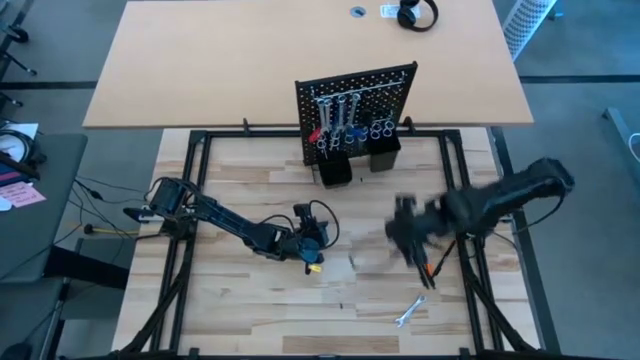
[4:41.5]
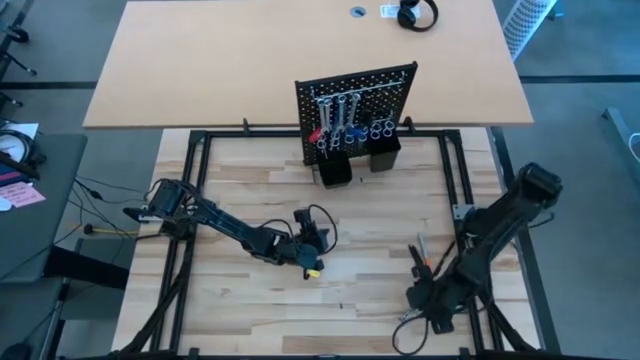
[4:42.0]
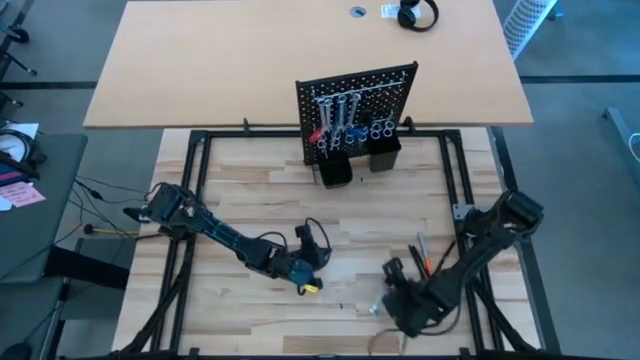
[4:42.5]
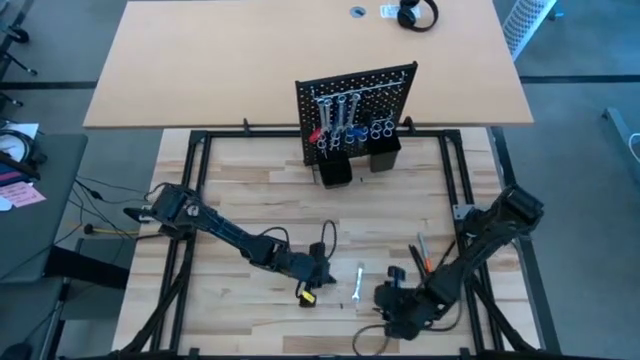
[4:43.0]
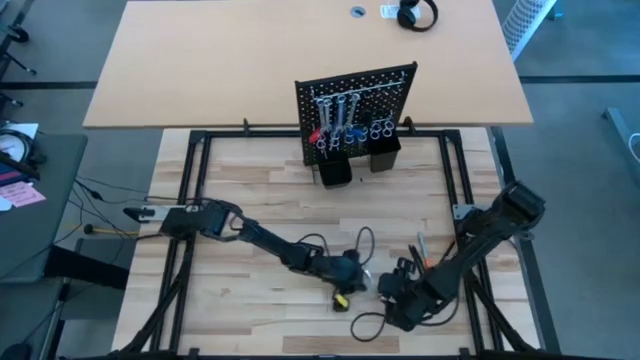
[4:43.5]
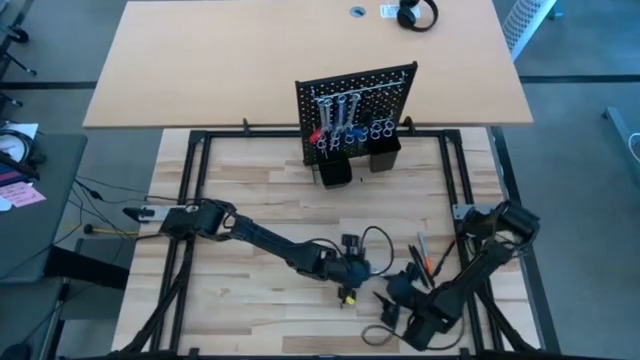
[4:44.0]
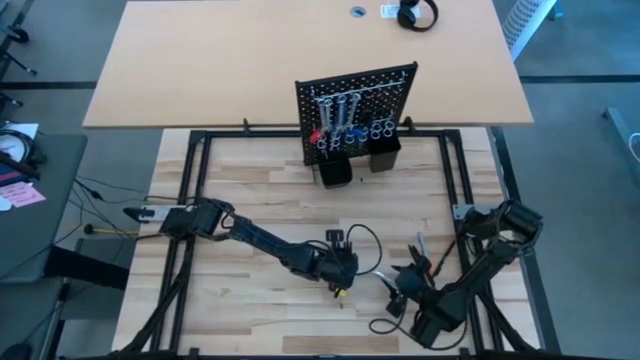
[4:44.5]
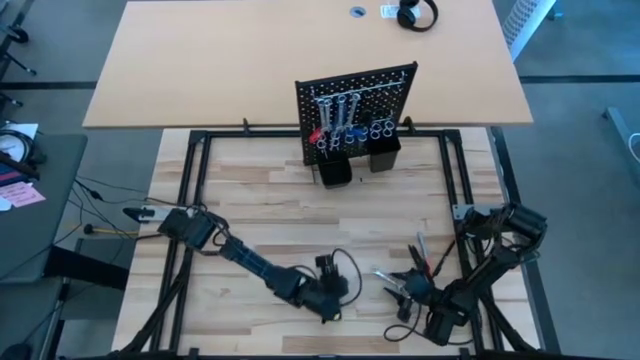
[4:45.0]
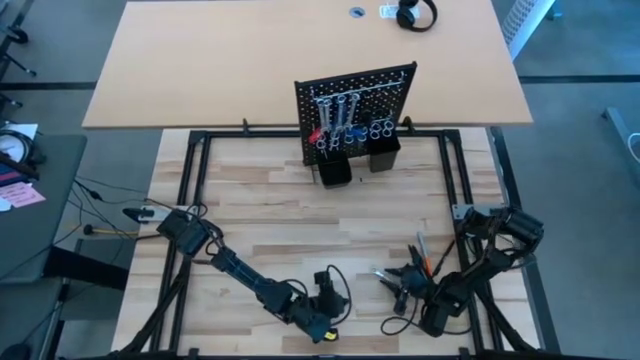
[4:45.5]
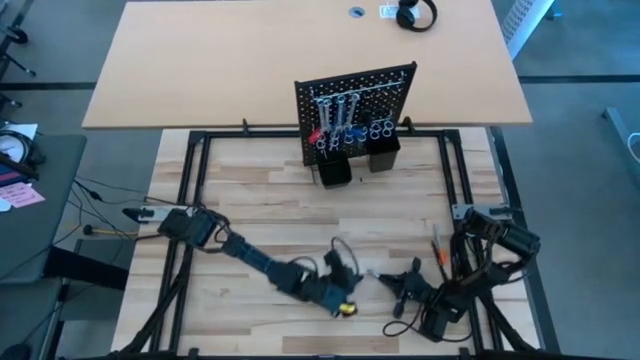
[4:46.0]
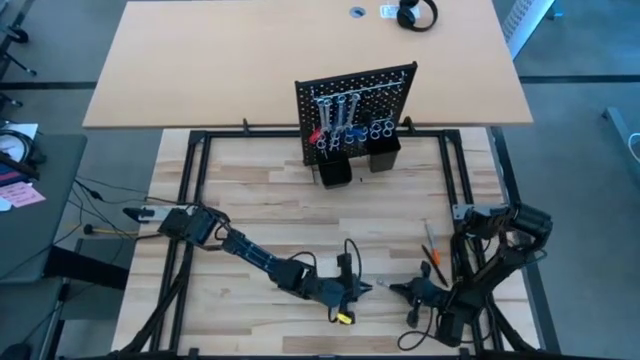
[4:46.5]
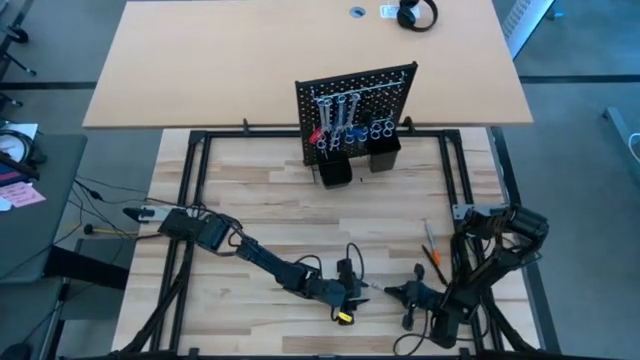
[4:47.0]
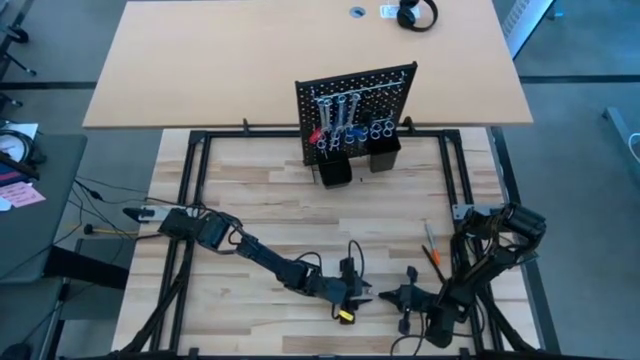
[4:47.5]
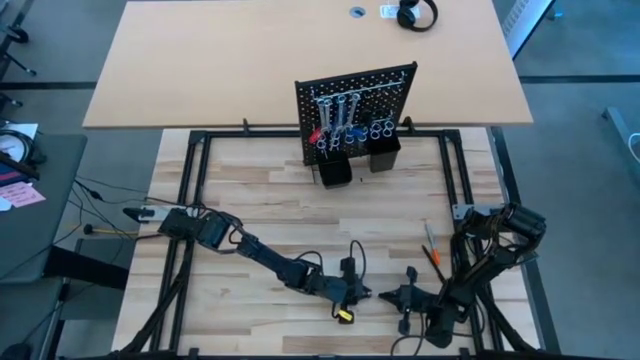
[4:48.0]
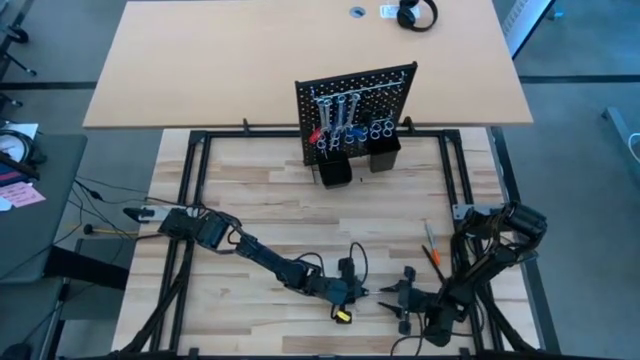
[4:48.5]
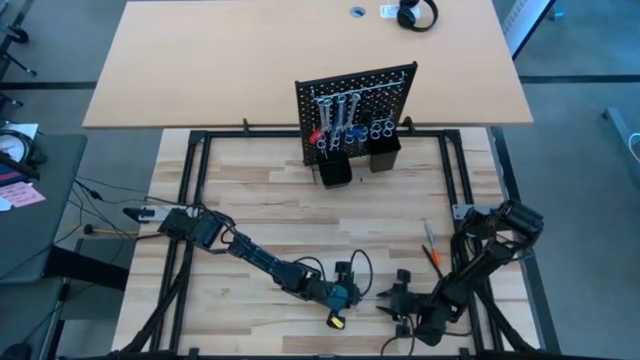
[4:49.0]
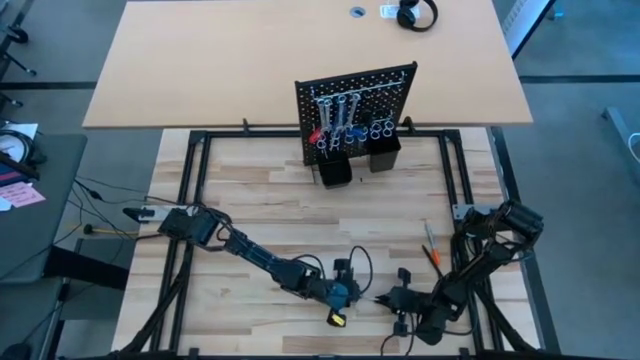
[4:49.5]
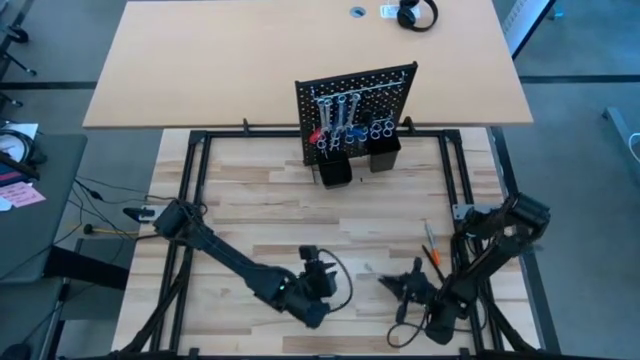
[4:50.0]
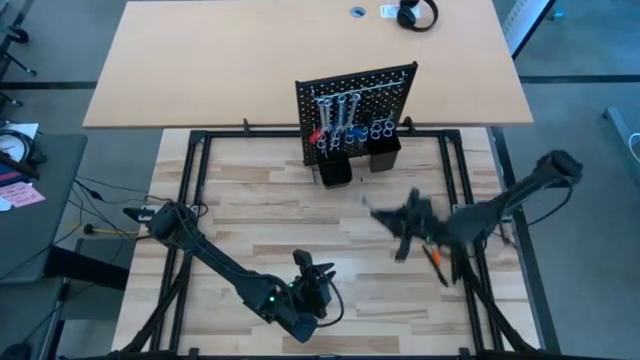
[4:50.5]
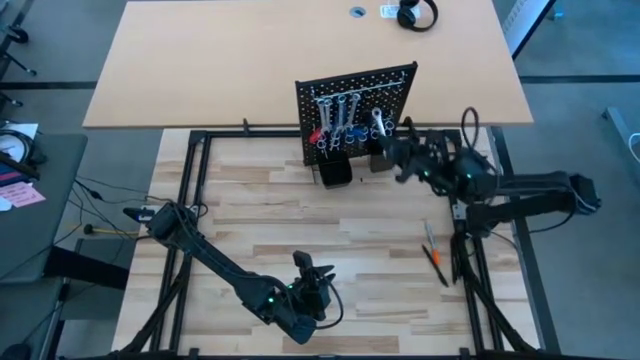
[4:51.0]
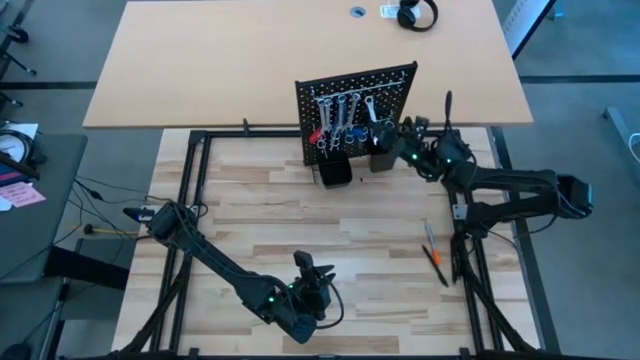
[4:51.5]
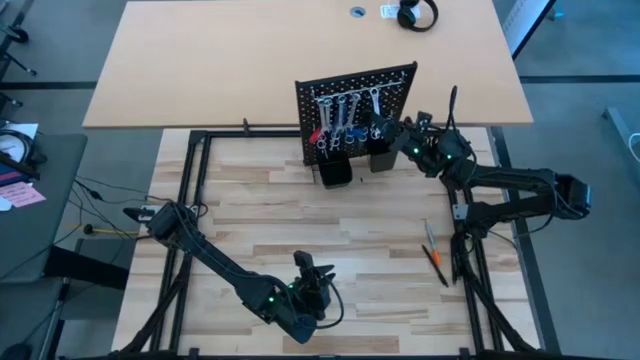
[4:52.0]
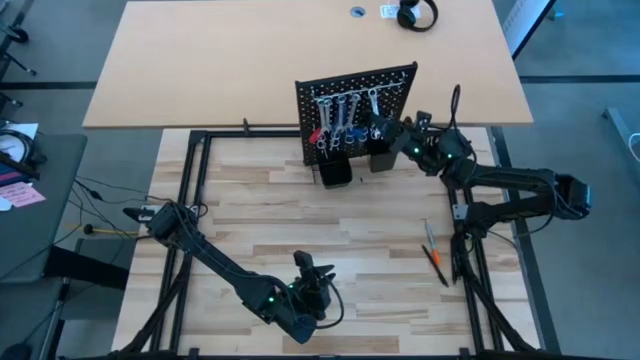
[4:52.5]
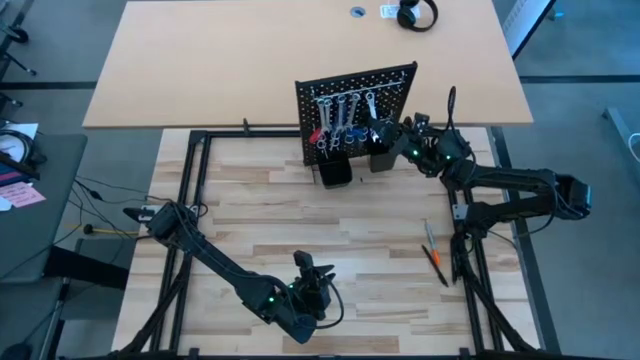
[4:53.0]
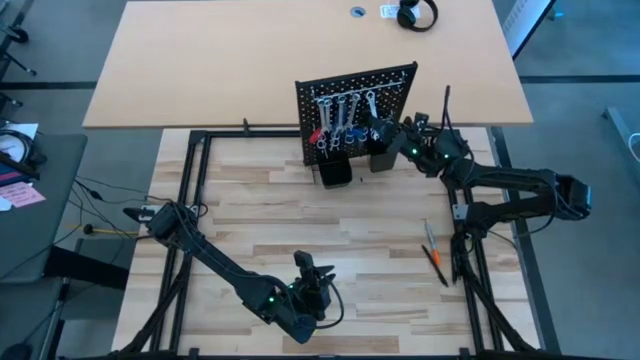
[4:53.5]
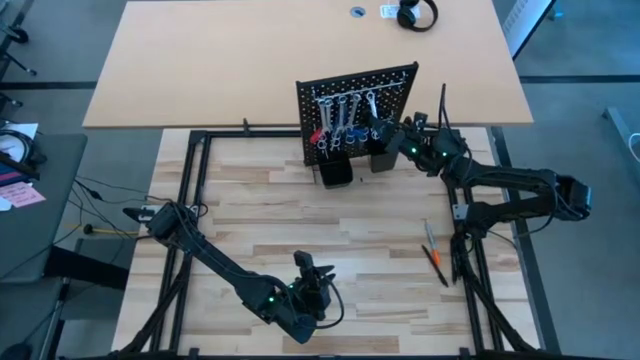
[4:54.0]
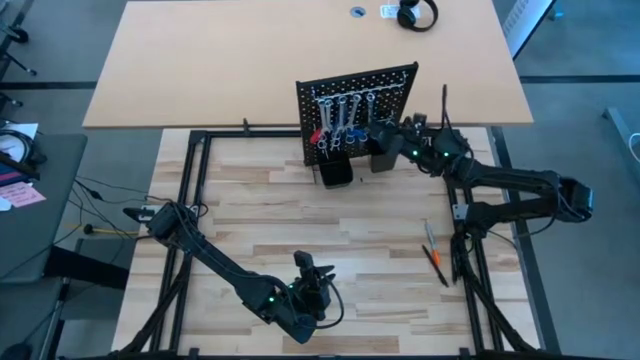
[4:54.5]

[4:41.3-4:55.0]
Task: Hang tools onto peg board
Hang the wrench on the pegboard

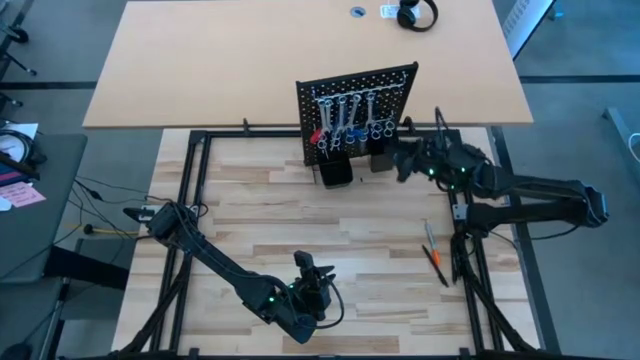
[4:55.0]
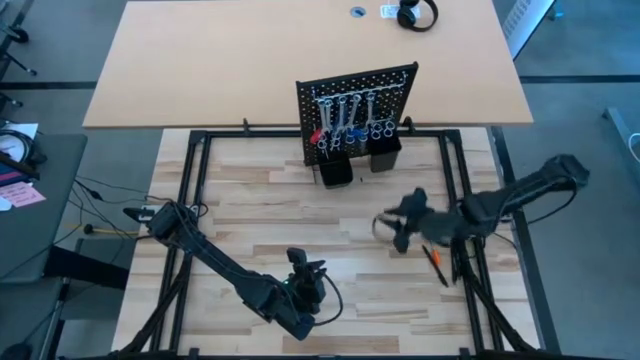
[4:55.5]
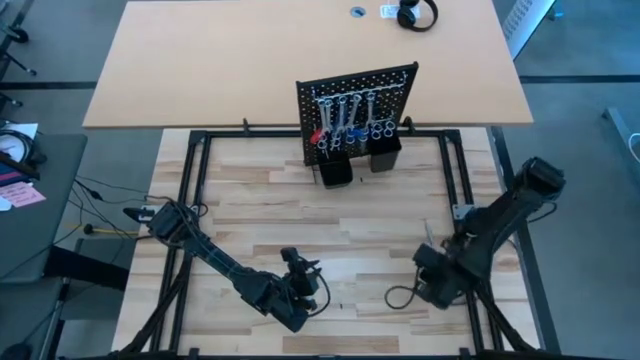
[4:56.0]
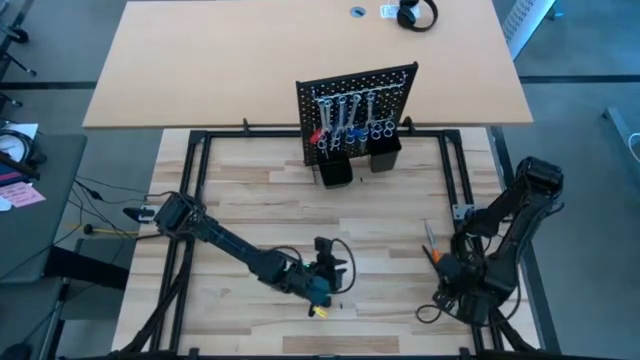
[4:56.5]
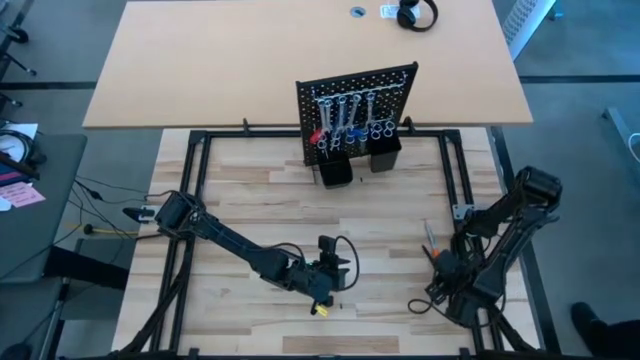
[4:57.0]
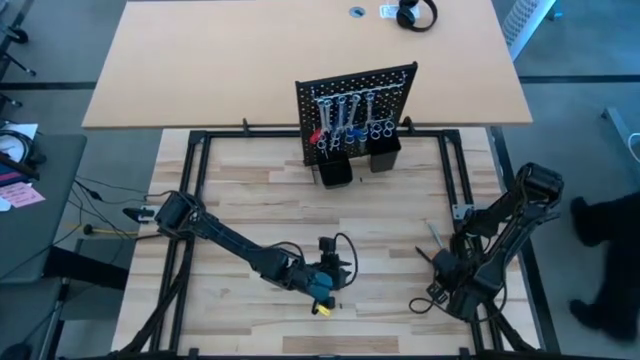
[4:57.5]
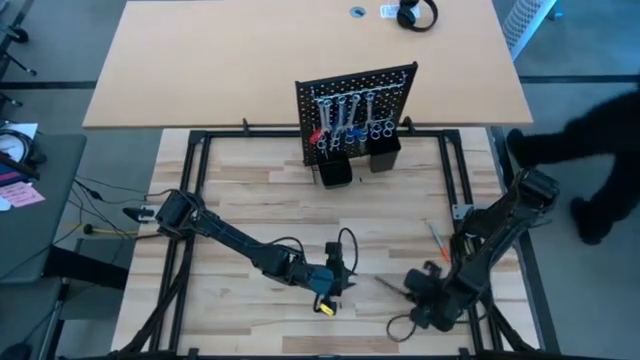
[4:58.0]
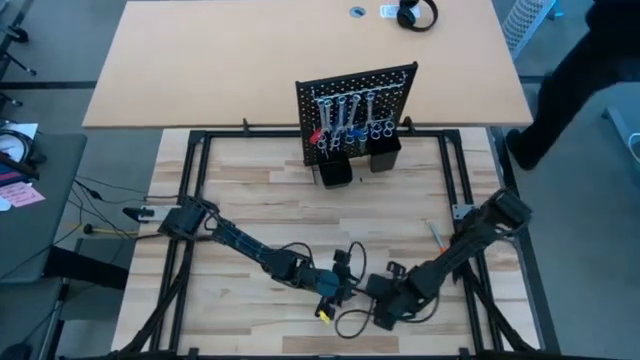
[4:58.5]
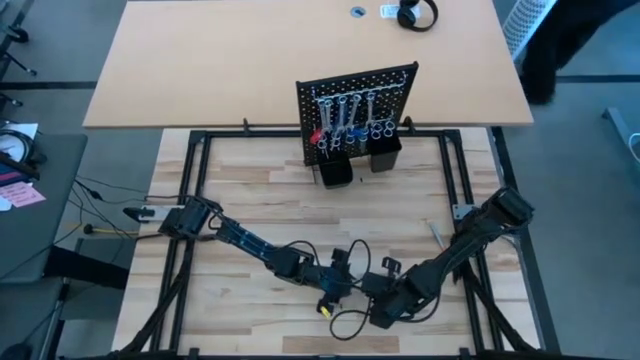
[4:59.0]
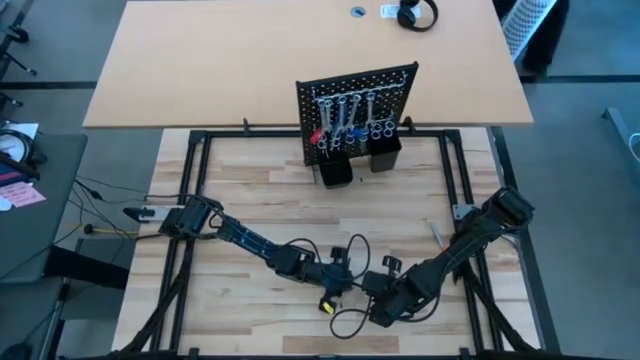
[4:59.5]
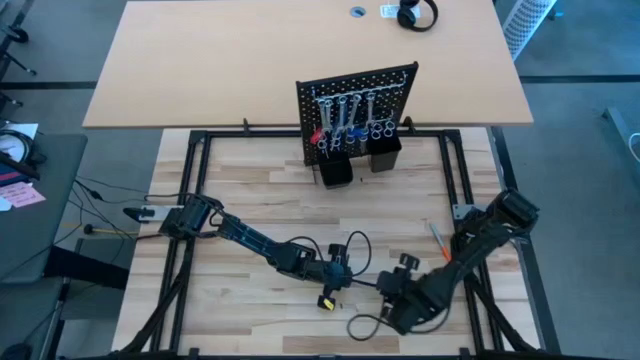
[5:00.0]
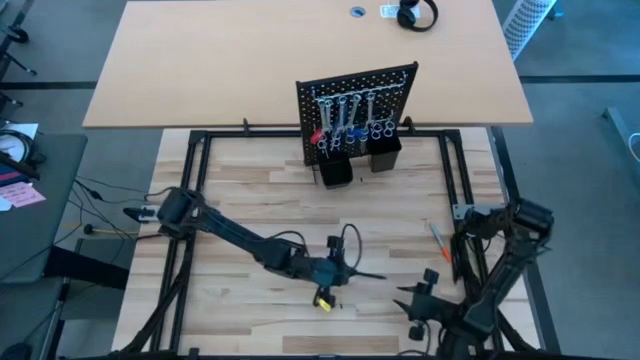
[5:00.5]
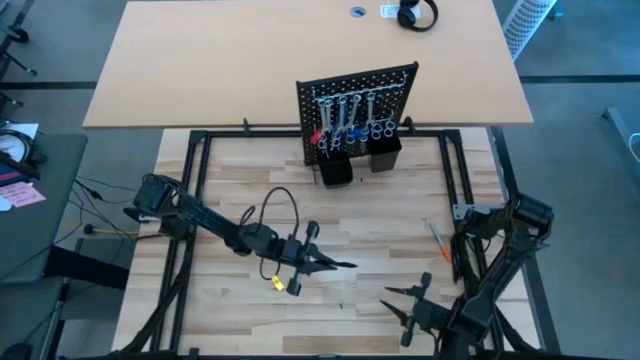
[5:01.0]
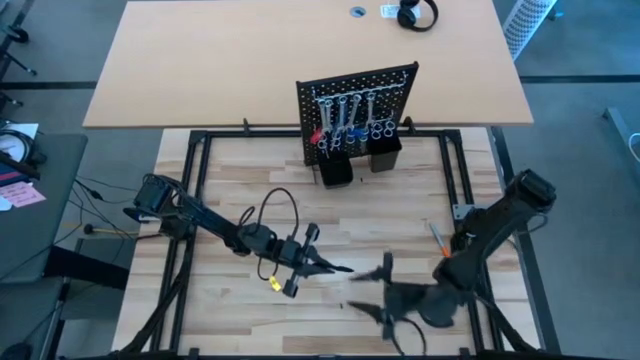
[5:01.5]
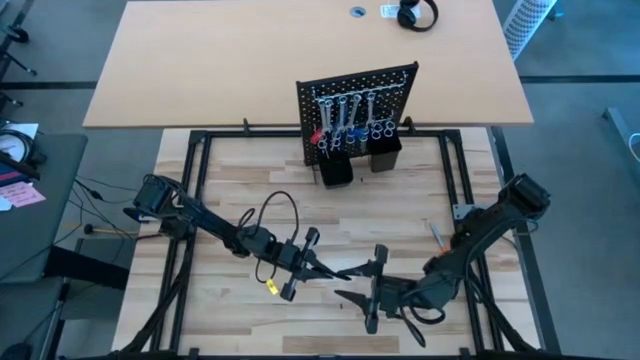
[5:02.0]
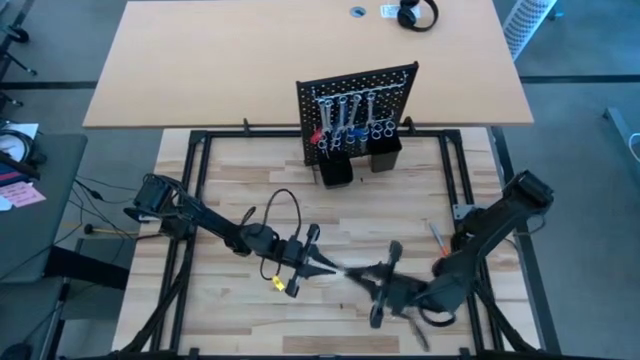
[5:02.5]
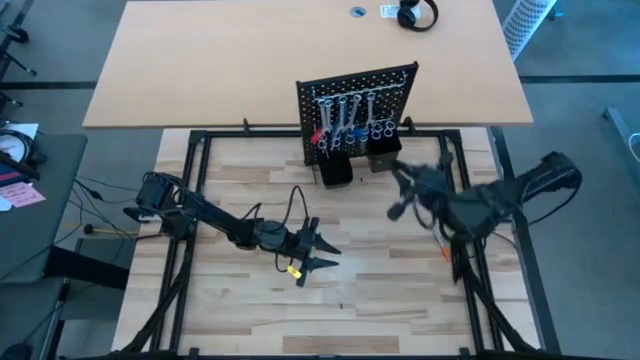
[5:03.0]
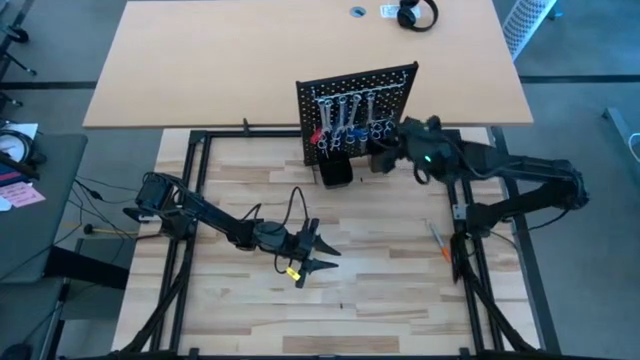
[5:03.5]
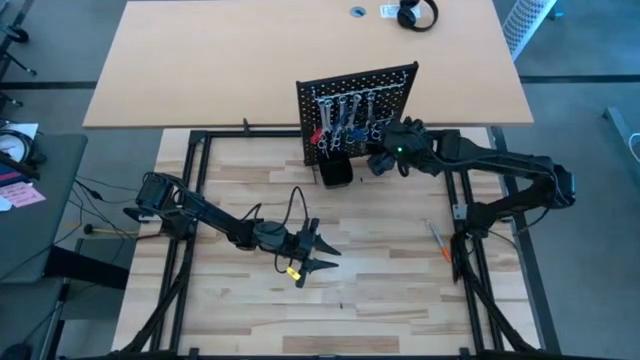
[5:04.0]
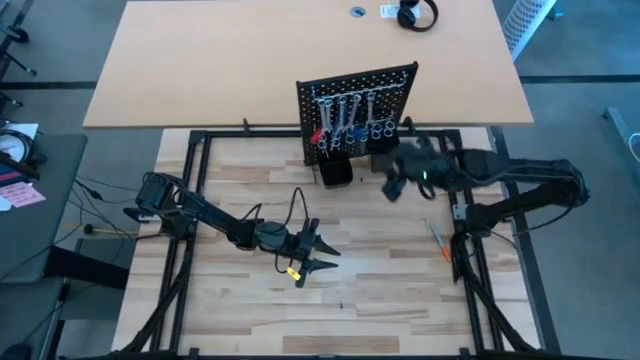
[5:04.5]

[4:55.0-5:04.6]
Put the left black pen into the right black bin on the pegboard
